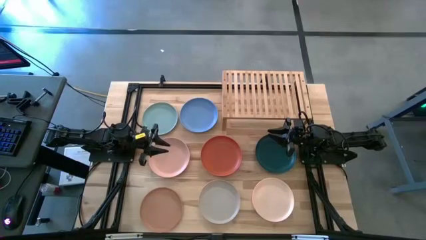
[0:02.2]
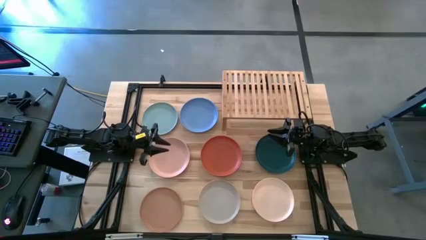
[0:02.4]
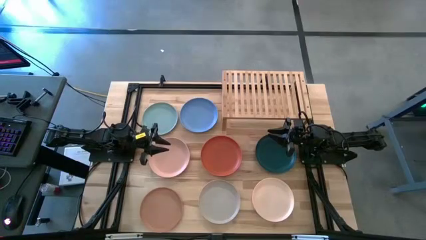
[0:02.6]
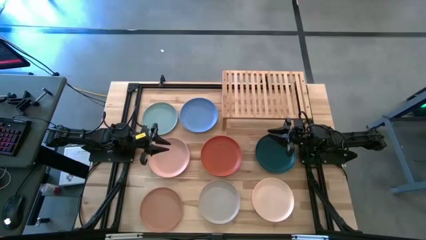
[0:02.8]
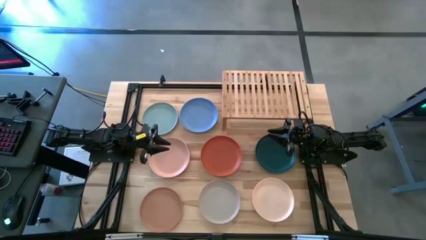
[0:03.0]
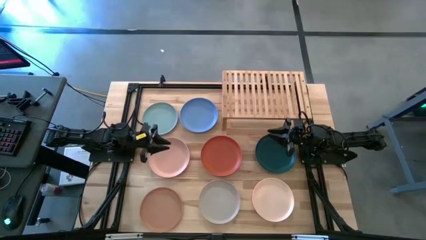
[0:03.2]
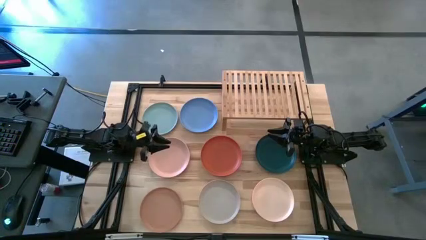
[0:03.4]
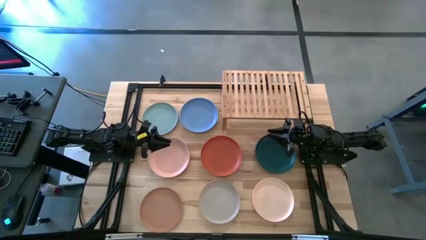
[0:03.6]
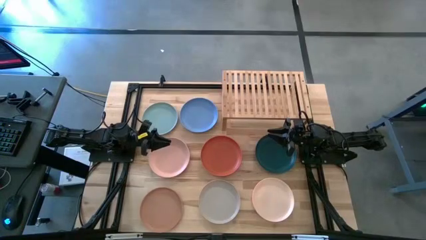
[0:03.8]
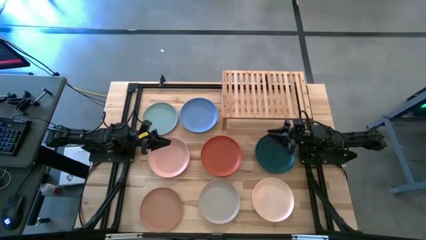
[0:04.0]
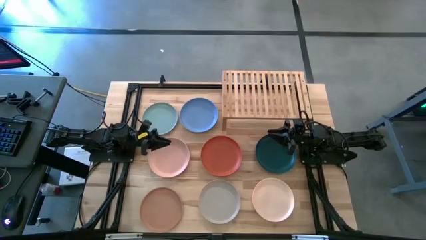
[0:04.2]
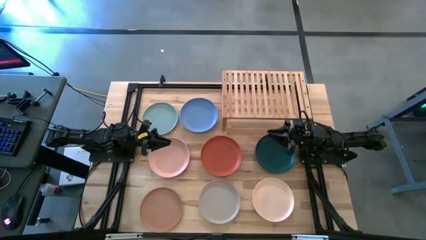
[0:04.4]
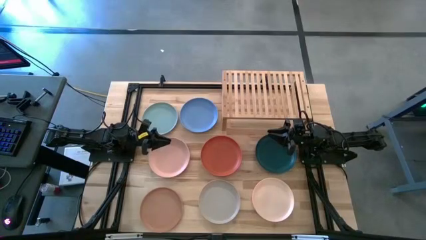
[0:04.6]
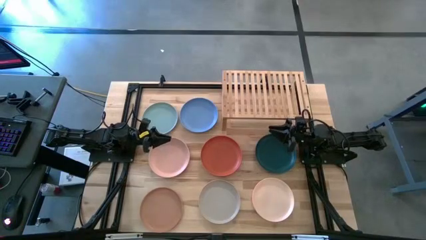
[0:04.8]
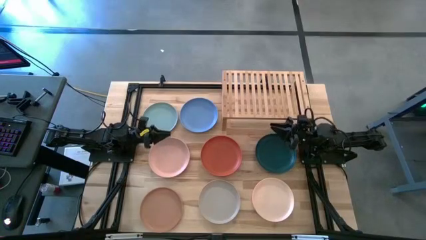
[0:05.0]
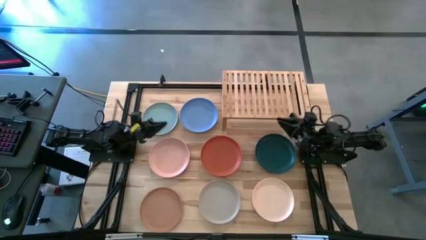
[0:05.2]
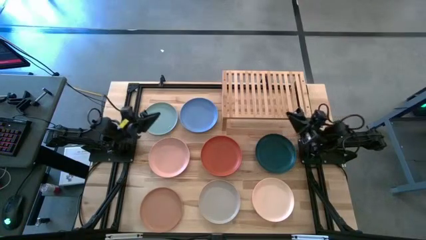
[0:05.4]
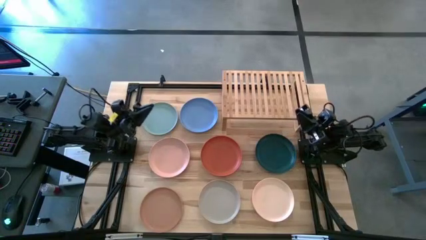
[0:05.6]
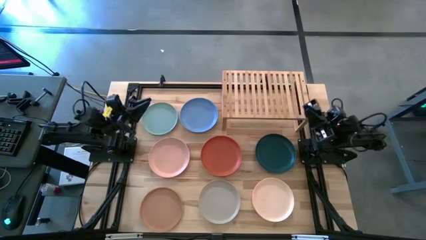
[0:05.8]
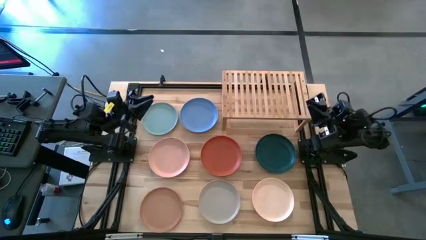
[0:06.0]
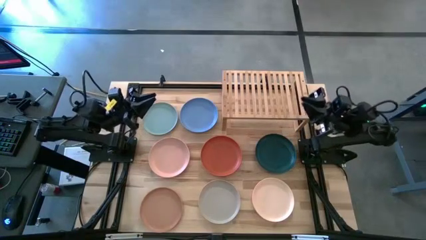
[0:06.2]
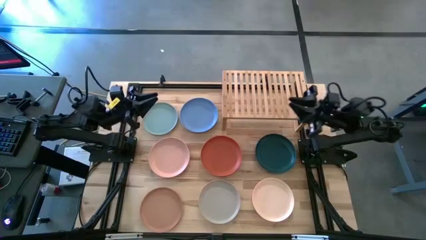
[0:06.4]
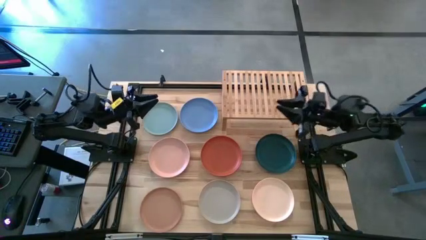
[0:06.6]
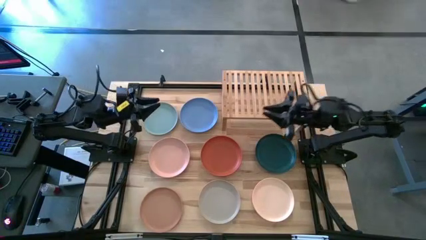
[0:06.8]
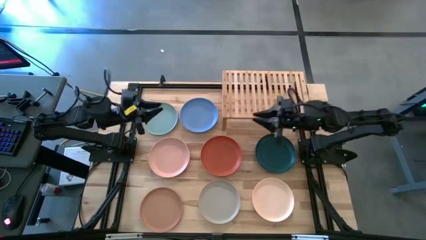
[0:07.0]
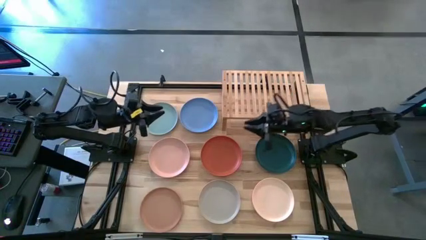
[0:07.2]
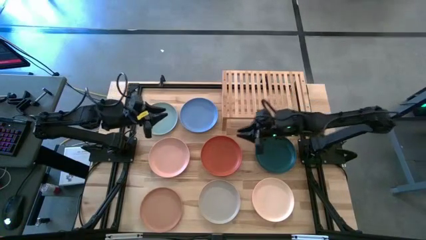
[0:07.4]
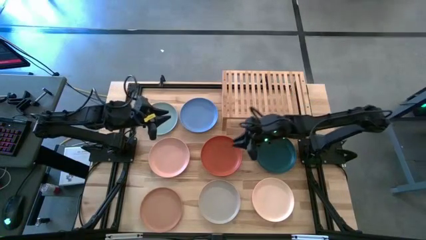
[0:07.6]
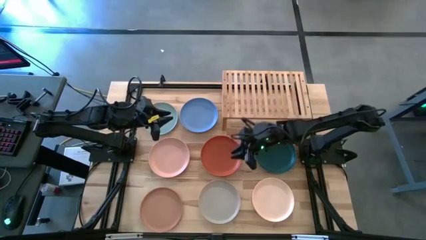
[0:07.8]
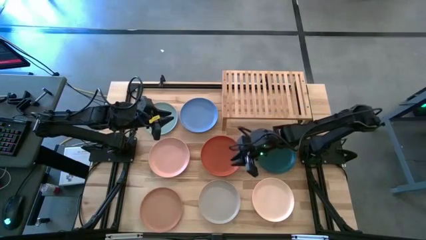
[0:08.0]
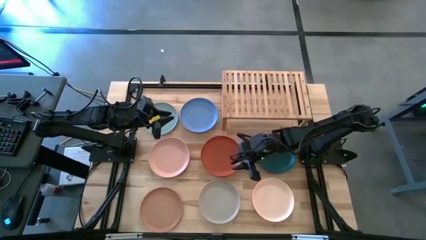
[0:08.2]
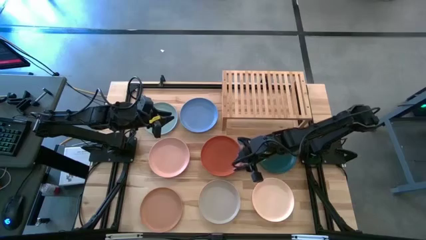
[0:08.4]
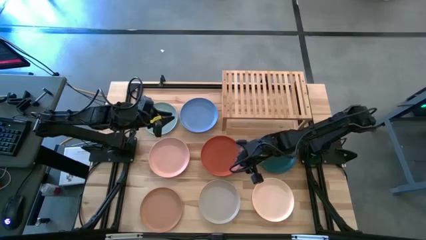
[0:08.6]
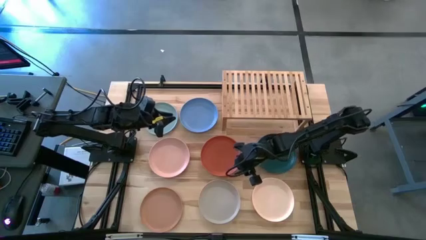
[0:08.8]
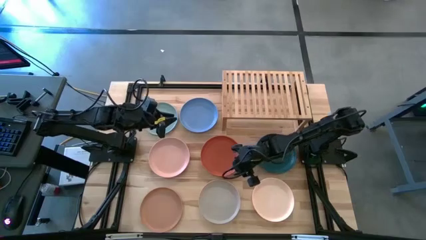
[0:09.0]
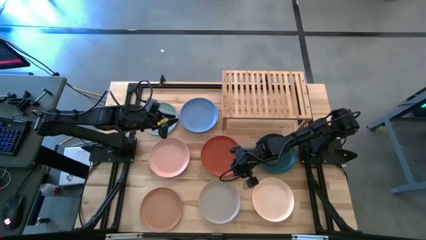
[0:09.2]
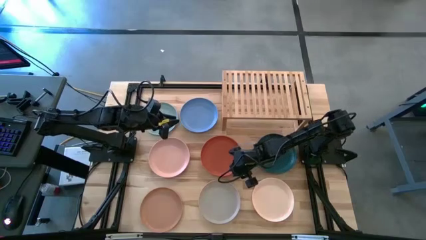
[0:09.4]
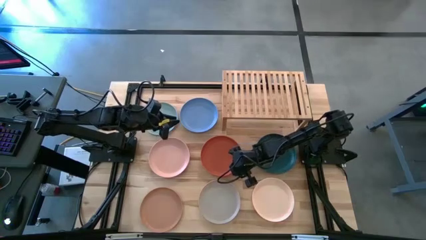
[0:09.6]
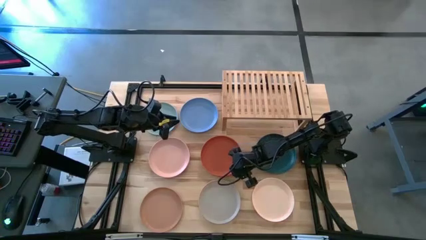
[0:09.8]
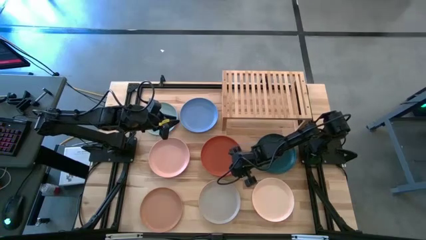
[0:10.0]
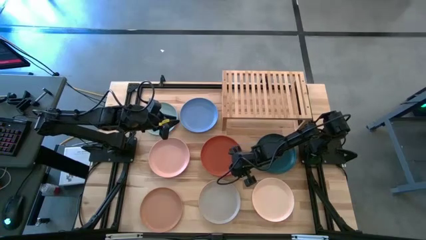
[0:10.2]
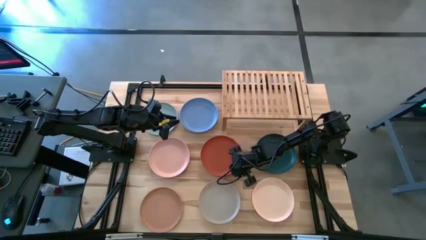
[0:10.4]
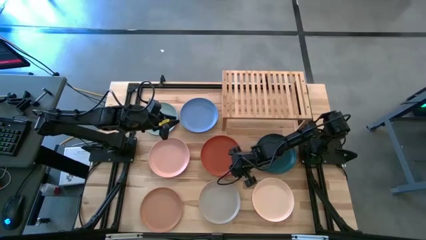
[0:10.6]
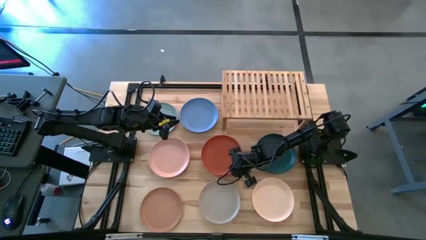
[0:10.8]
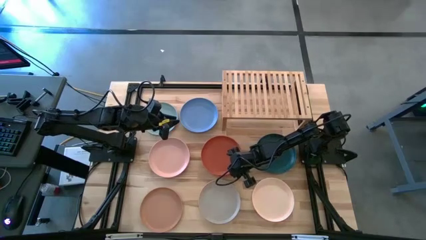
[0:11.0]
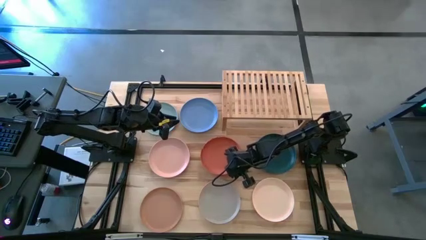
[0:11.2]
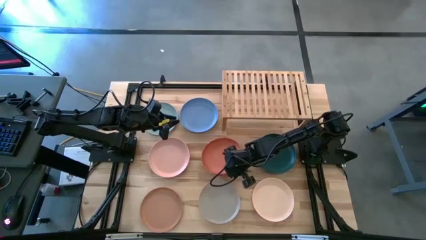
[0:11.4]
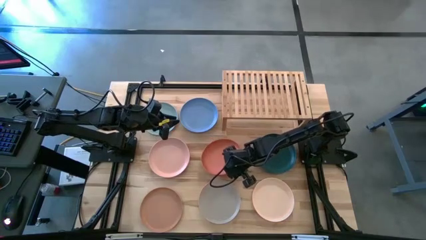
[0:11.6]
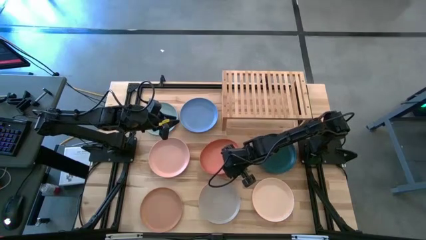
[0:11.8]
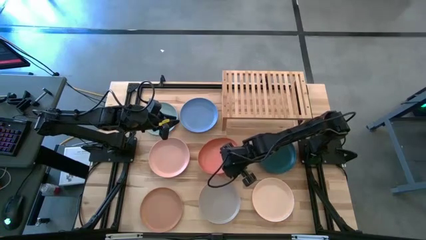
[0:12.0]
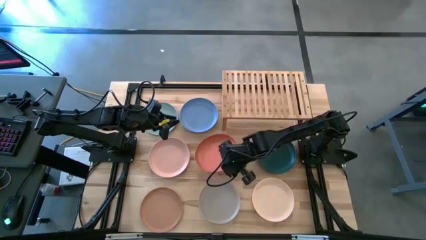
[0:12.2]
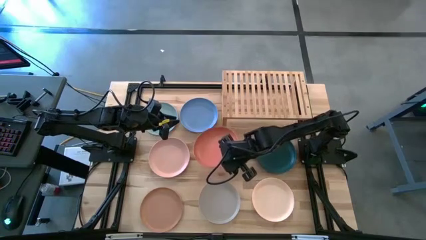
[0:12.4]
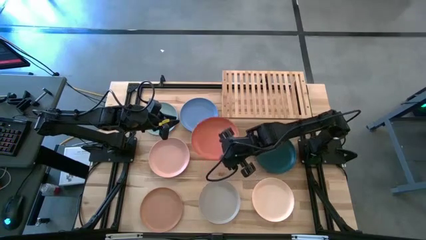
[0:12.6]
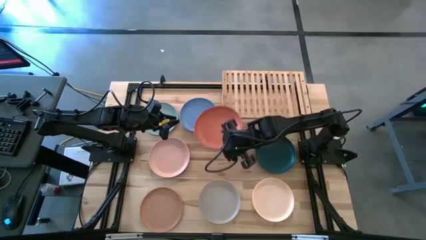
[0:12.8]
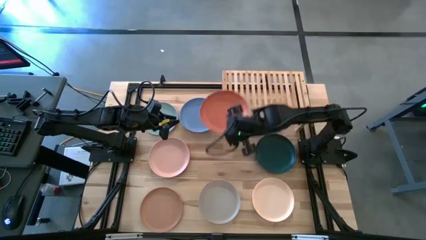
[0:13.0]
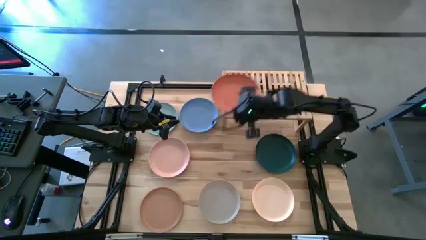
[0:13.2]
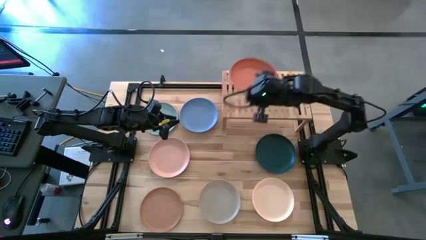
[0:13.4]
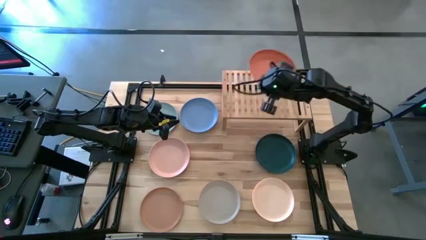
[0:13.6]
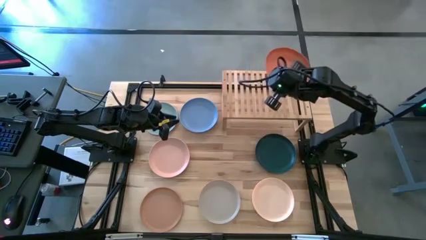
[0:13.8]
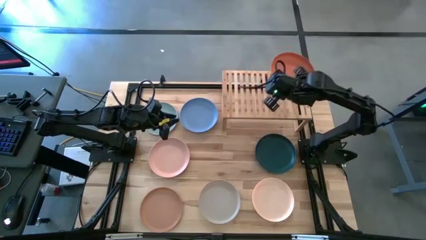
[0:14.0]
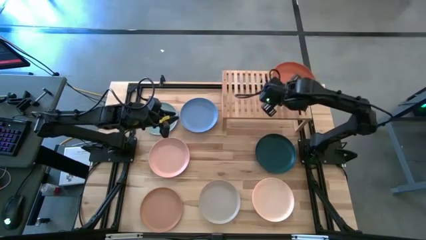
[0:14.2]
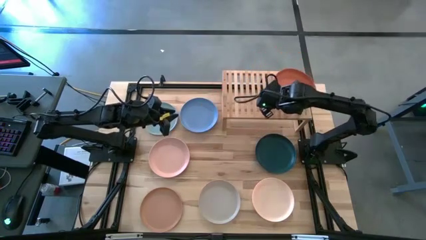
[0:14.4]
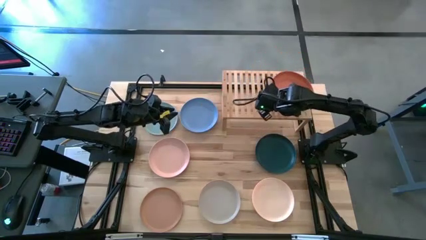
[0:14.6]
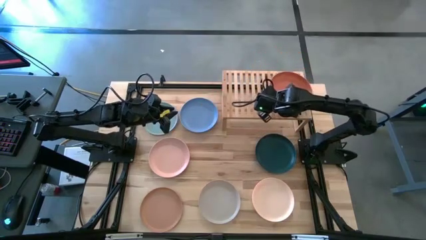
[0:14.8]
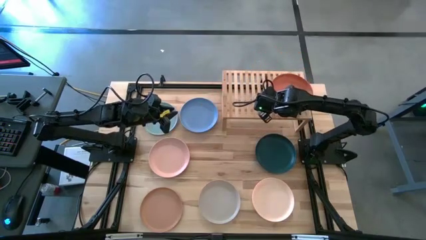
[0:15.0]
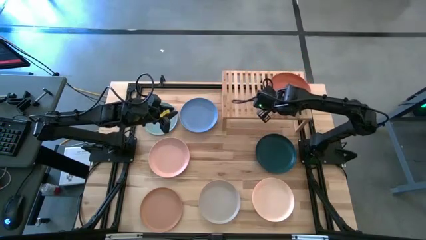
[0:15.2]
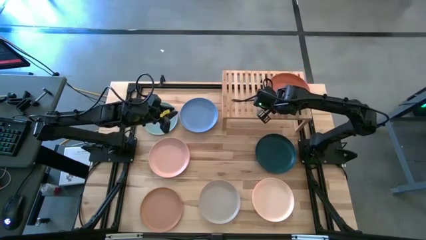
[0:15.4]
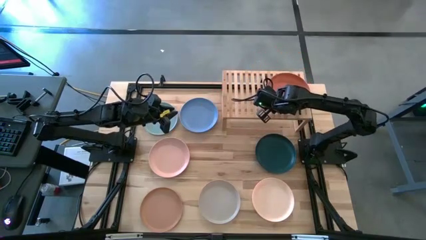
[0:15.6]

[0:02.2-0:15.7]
Task: Place and stack plates onto a shelf
Put the orange plate on the shelf
